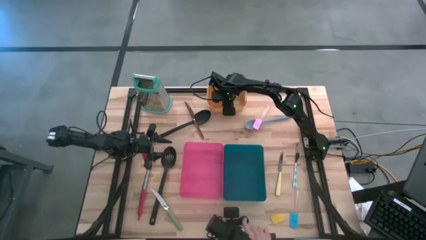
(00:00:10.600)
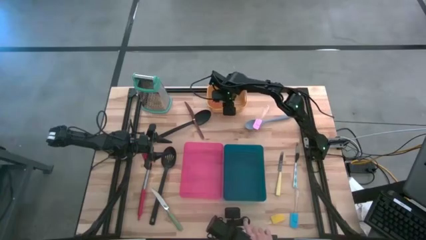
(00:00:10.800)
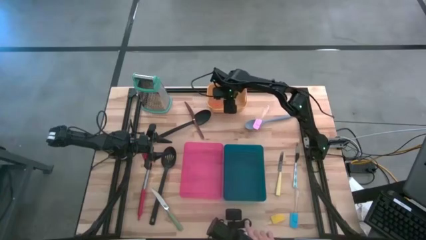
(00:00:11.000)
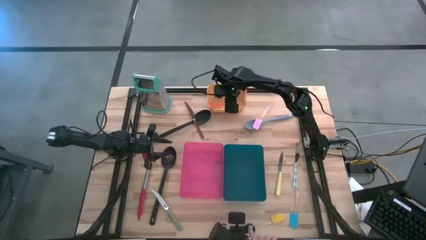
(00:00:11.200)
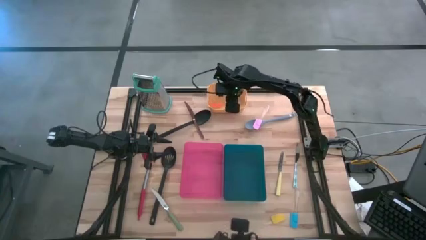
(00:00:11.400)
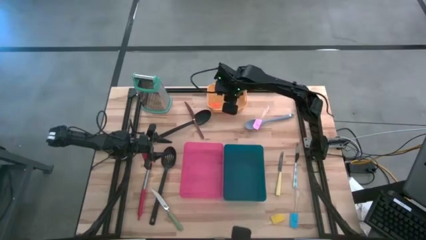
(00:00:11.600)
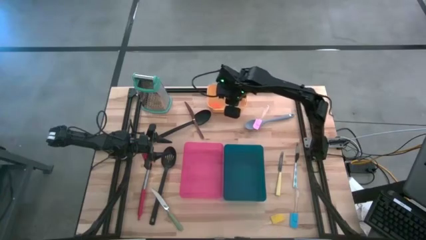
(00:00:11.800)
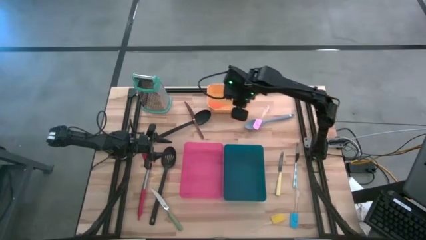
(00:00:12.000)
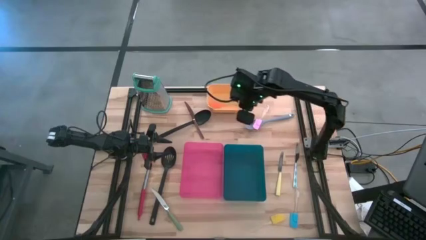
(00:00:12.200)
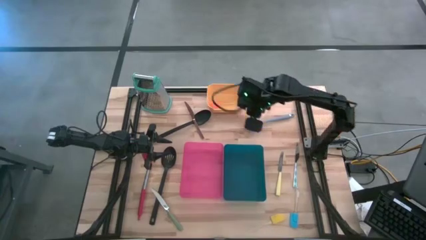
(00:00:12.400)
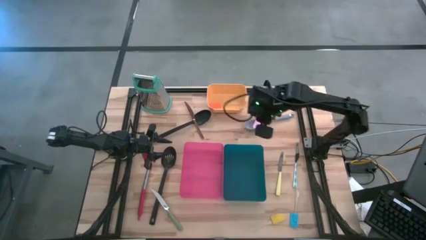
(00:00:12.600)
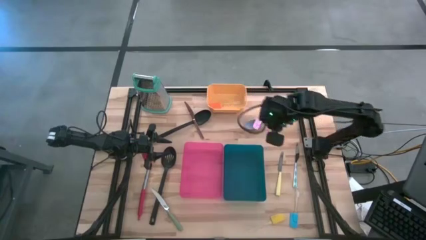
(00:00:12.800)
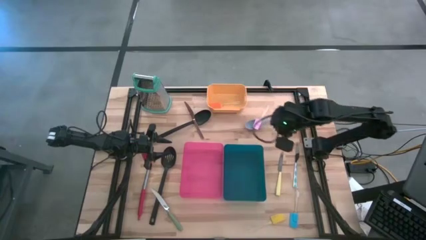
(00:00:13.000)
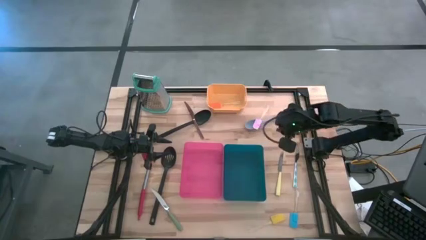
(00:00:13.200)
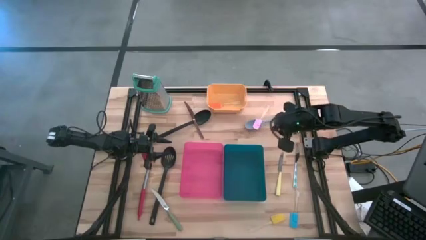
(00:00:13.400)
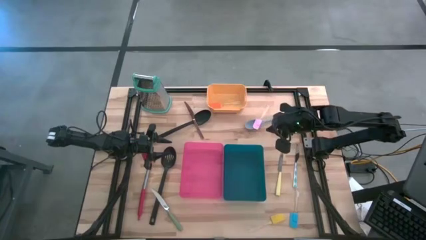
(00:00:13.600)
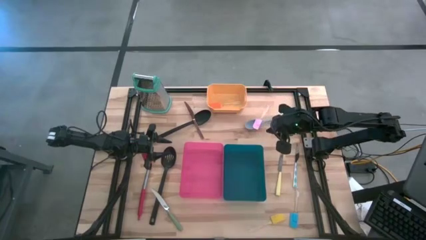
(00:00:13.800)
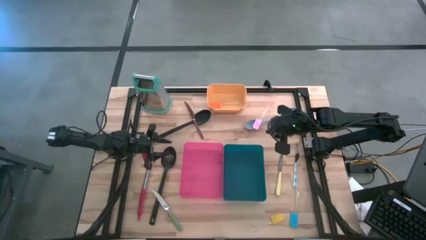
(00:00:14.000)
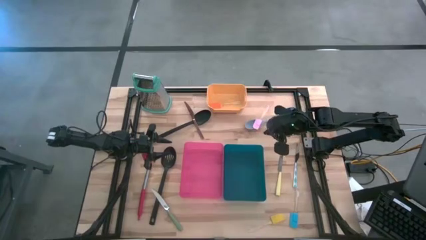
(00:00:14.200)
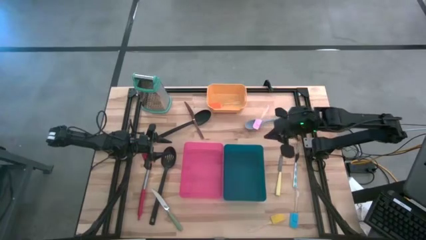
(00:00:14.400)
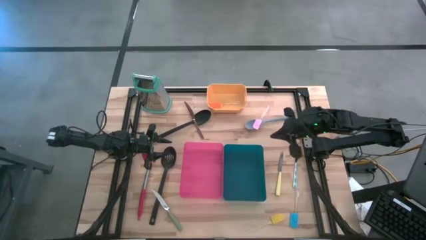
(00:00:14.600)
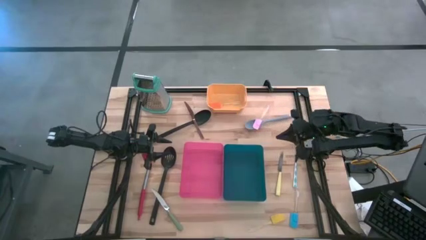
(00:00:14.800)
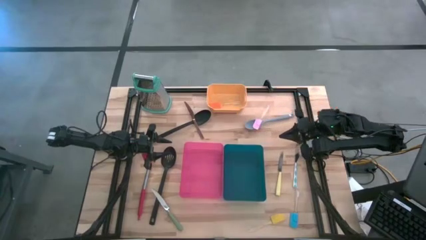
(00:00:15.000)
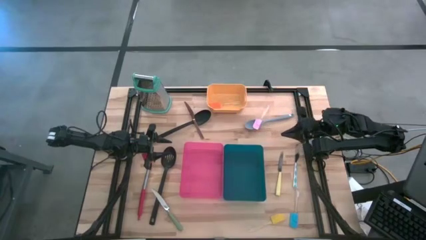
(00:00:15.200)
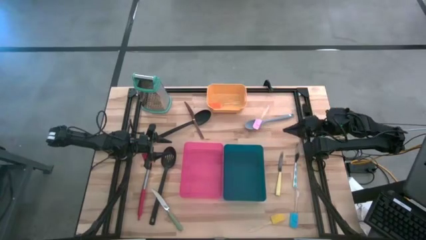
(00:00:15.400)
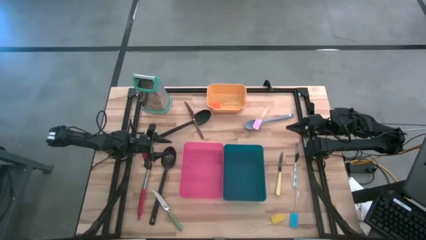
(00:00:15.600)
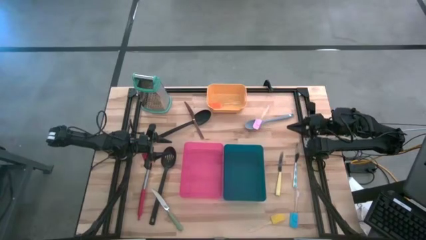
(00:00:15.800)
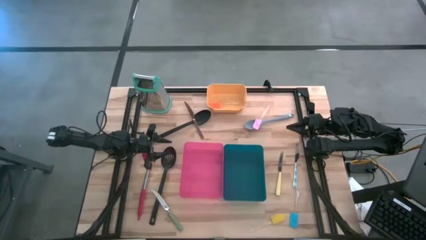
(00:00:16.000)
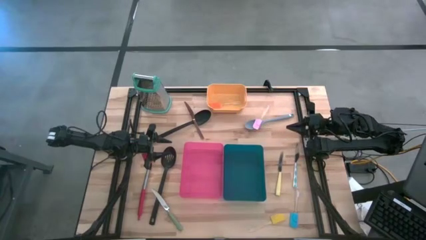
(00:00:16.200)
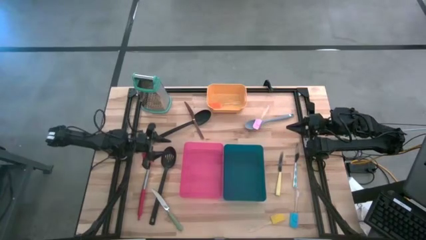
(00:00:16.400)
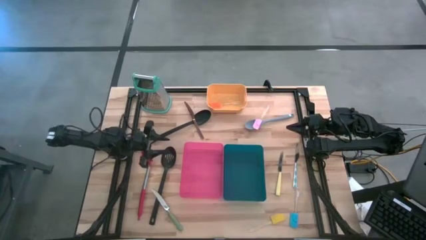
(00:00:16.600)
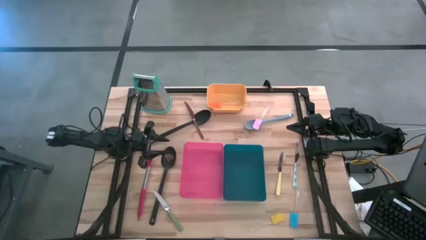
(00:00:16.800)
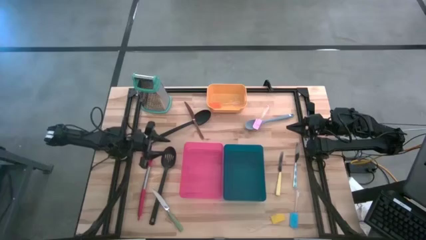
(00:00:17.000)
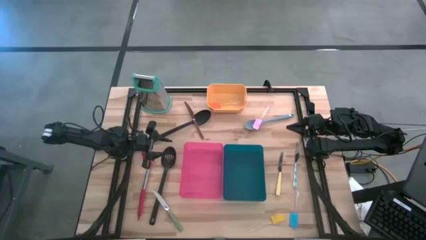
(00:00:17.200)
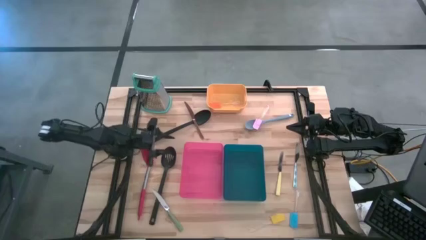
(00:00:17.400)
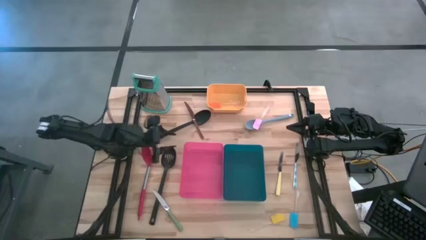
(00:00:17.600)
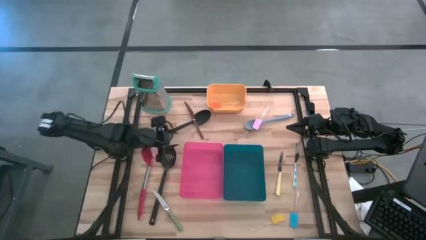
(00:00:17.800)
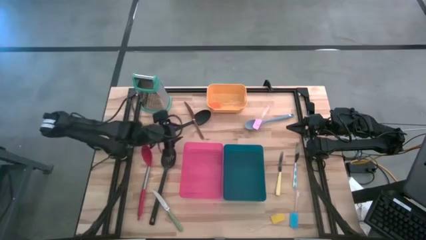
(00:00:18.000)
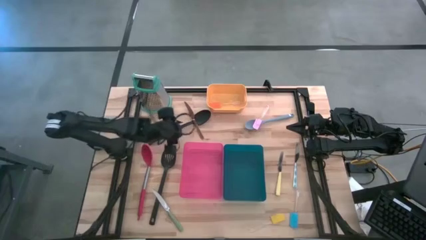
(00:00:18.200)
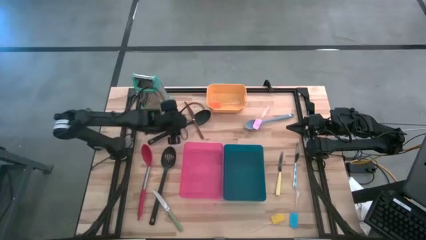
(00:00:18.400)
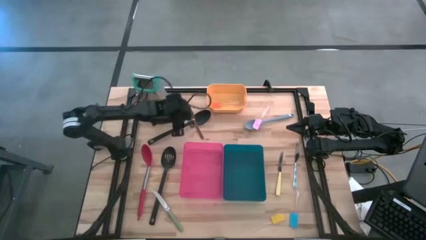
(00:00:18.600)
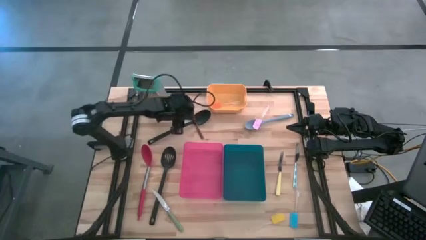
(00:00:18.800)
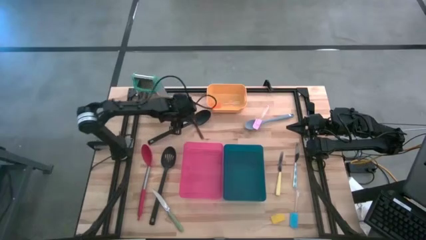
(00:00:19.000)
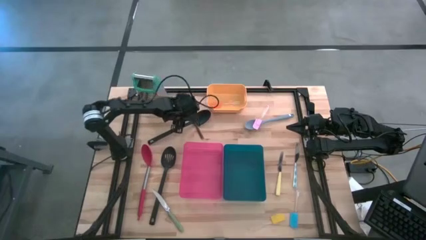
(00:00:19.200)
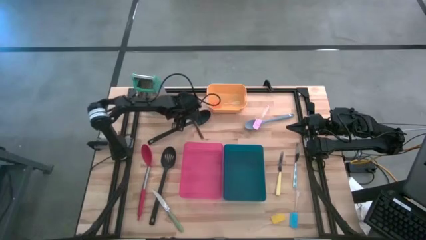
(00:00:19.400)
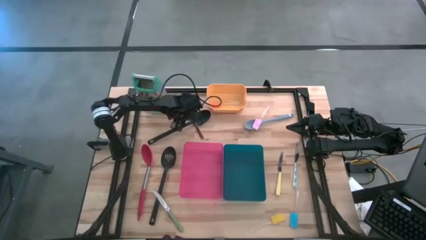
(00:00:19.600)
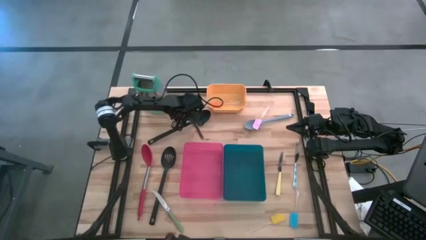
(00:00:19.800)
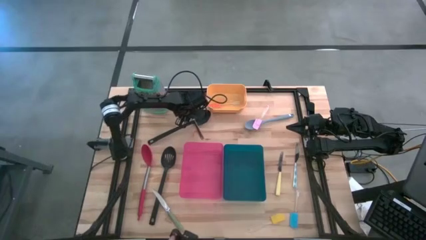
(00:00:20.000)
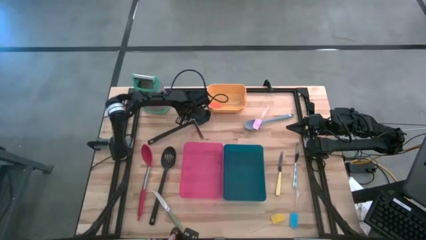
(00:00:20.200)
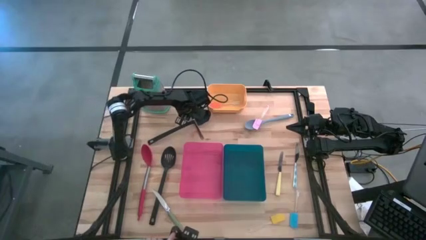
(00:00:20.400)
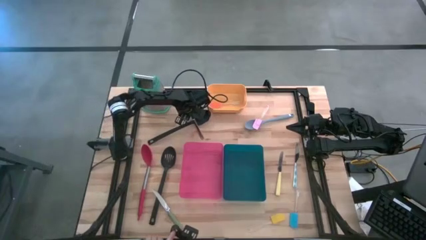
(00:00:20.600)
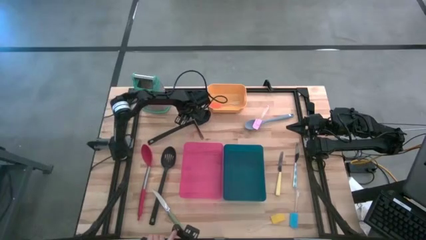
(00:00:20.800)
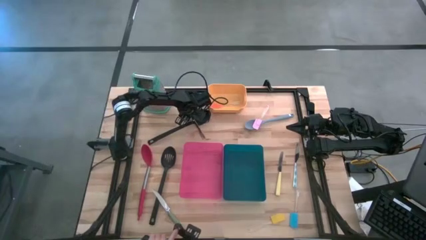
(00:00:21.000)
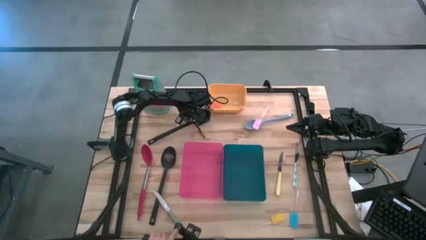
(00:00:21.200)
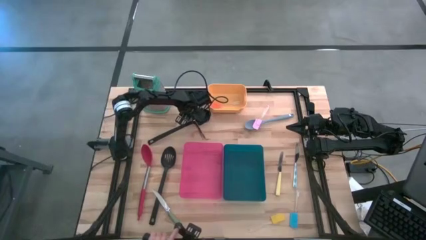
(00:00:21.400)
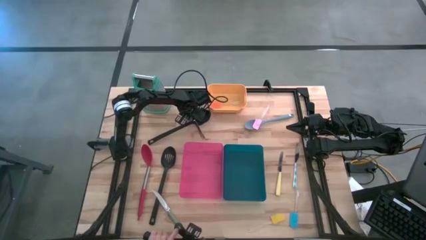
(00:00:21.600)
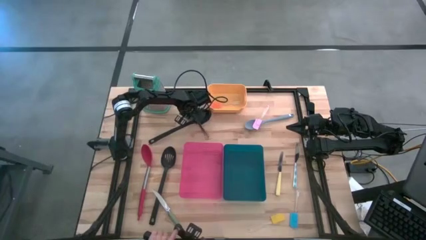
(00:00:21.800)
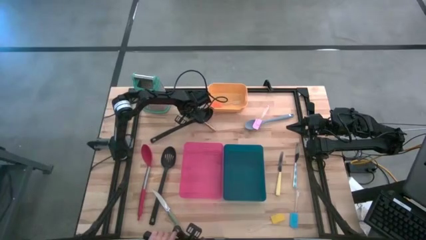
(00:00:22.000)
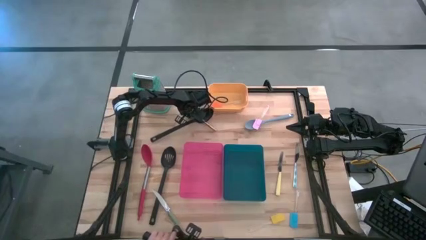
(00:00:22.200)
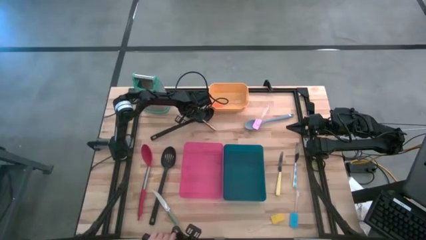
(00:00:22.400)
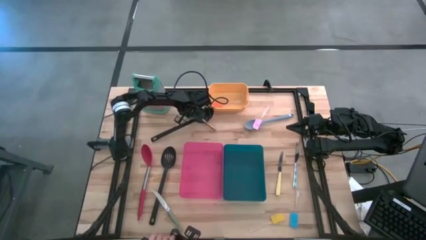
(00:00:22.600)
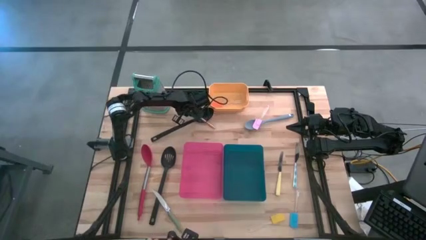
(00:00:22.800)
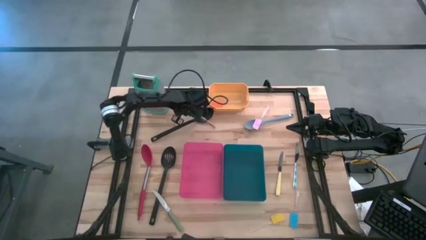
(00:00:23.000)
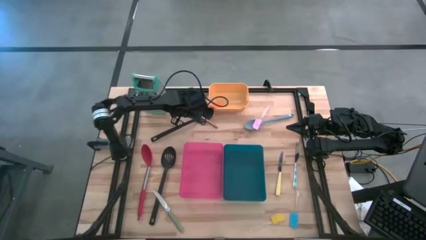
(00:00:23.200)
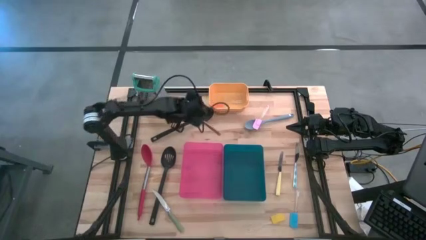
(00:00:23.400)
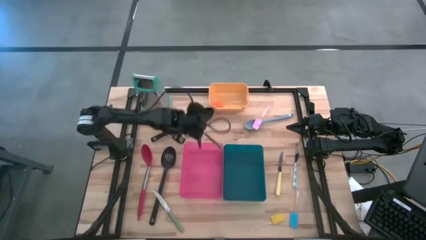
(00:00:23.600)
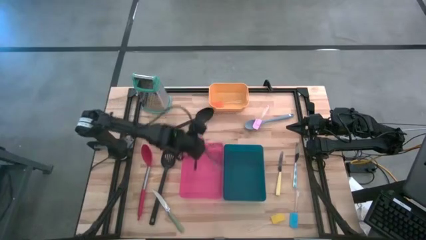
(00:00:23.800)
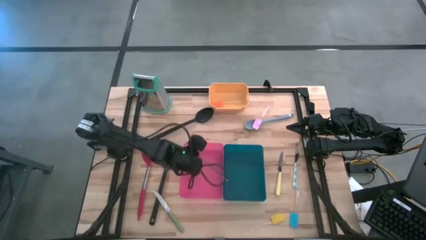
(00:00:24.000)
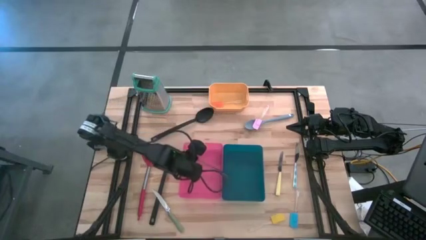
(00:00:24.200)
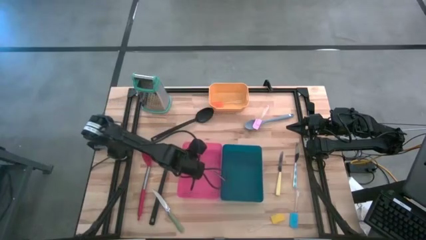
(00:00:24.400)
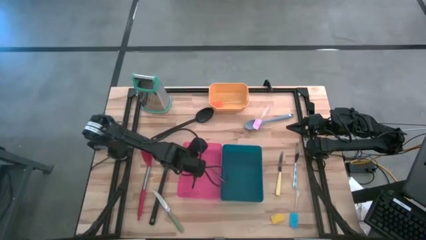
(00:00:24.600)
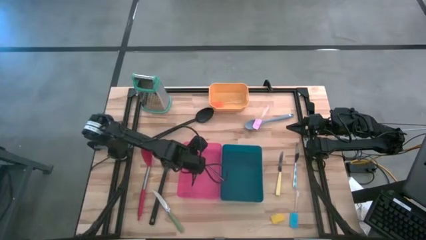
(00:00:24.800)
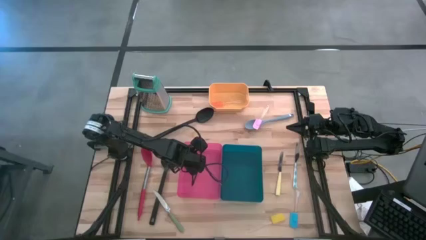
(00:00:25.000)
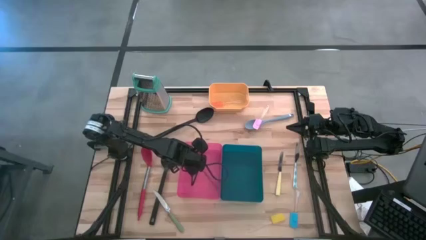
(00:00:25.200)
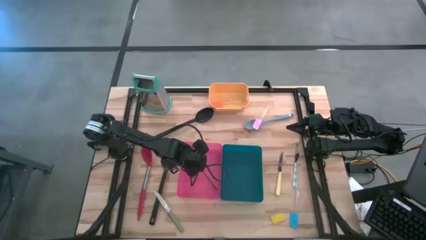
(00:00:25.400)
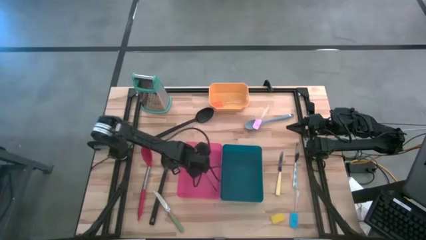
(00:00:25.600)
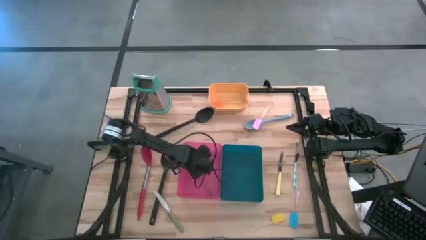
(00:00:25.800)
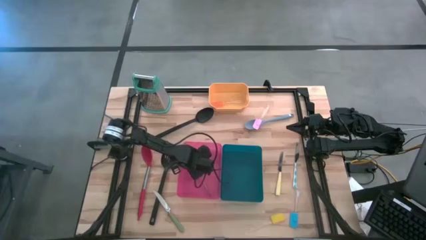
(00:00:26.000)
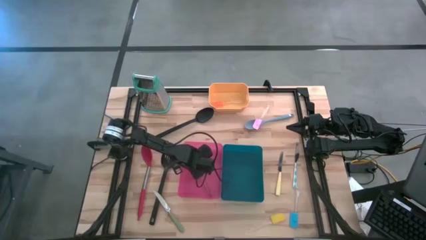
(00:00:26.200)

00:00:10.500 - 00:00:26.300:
Task: Pick & Place Kitchen Items
Put the brown knife into the red bin

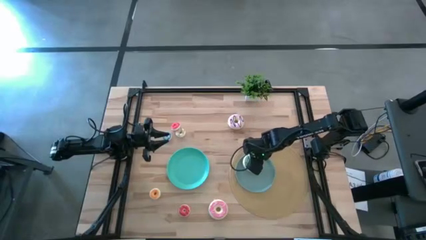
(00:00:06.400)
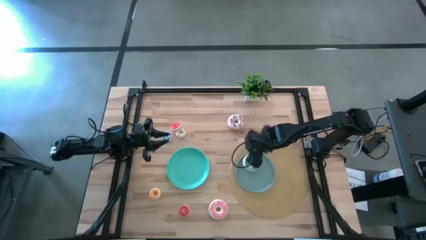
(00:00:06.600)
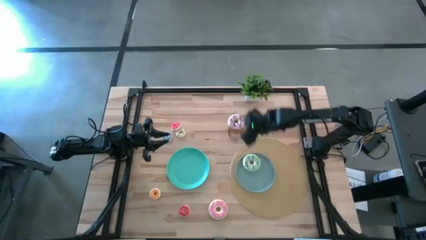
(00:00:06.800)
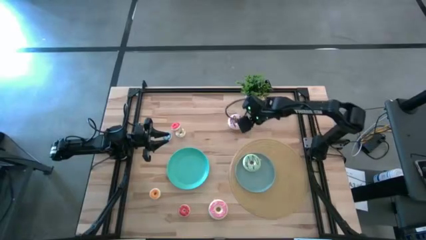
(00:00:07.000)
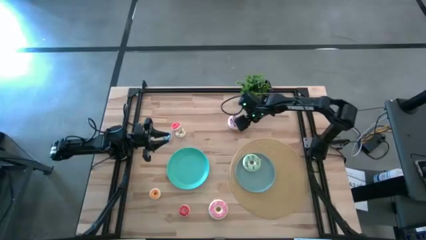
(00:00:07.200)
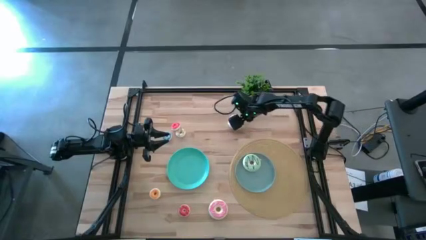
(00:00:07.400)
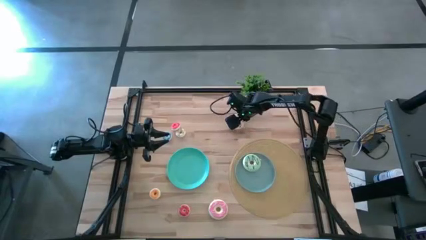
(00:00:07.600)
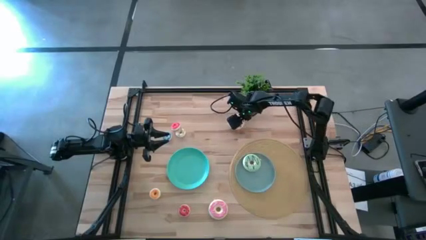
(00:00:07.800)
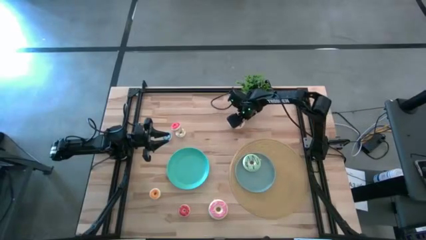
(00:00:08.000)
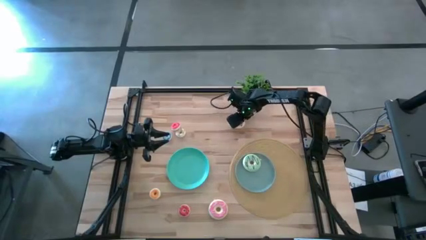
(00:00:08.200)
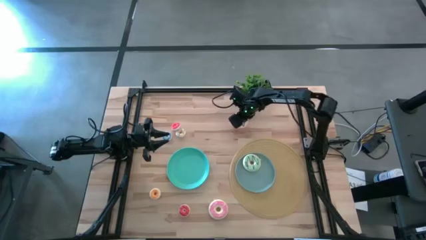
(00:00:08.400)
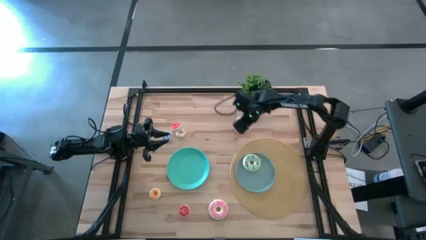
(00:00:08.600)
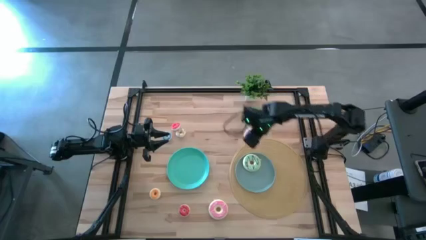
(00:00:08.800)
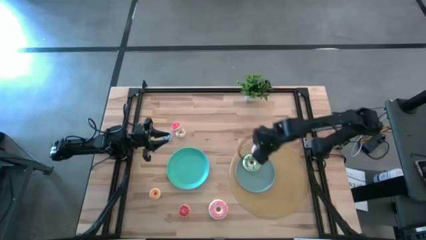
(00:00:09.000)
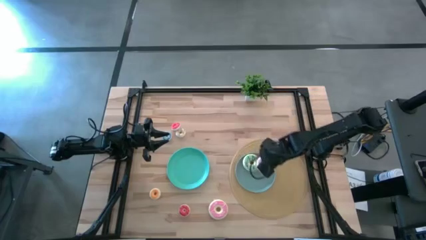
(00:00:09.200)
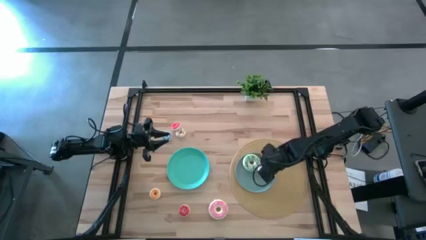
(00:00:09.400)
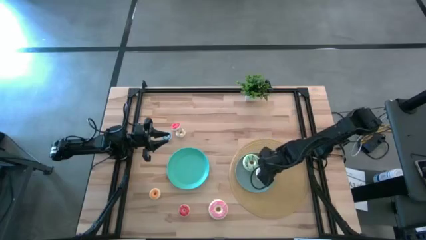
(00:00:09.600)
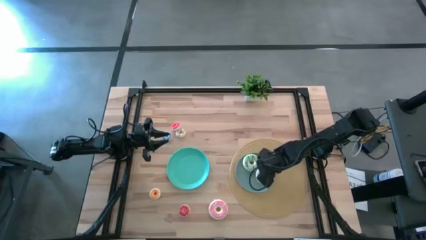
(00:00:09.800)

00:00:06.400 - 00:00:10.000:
Task: Pick & Place donuts
Put the big purple donut on the blue plate
